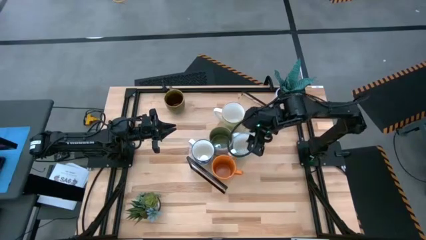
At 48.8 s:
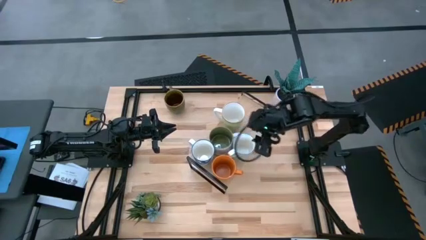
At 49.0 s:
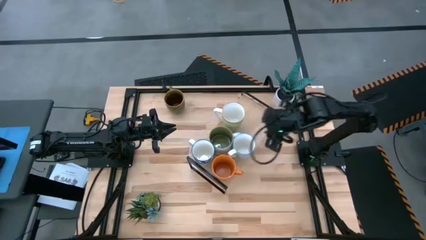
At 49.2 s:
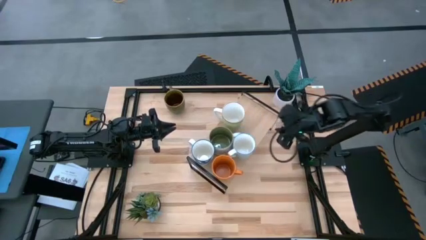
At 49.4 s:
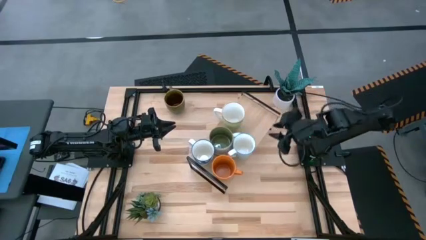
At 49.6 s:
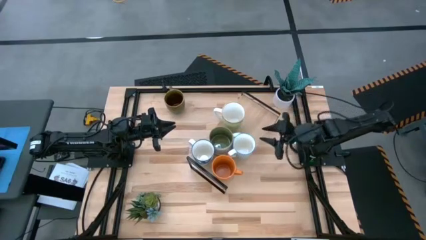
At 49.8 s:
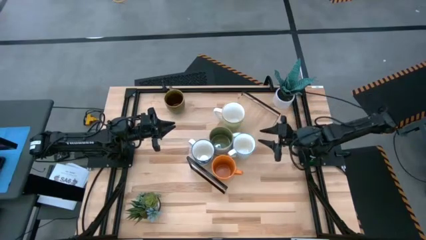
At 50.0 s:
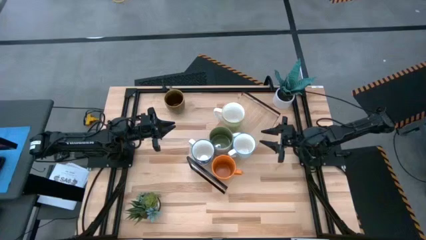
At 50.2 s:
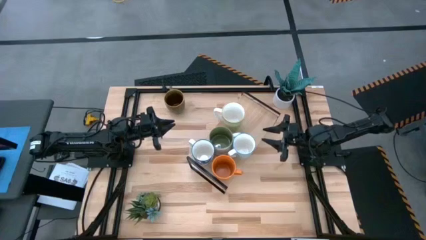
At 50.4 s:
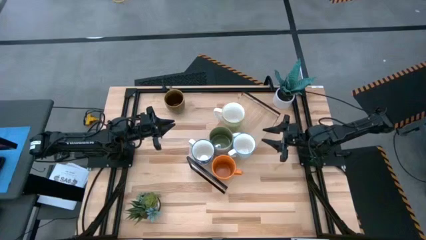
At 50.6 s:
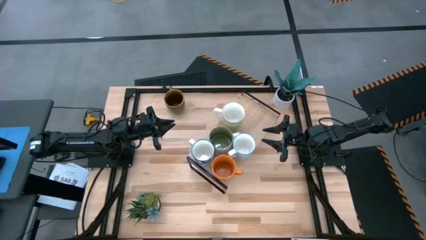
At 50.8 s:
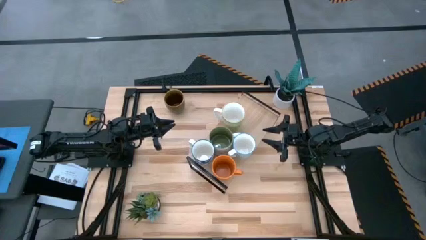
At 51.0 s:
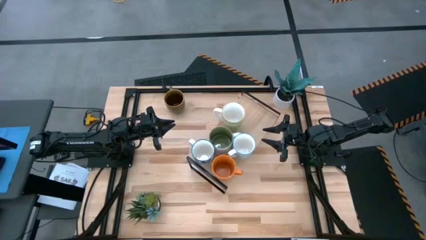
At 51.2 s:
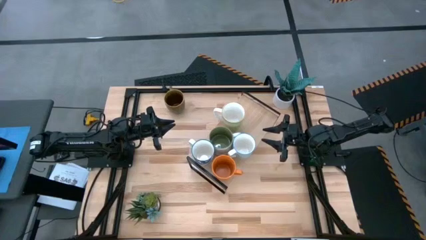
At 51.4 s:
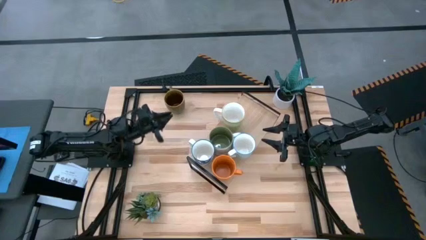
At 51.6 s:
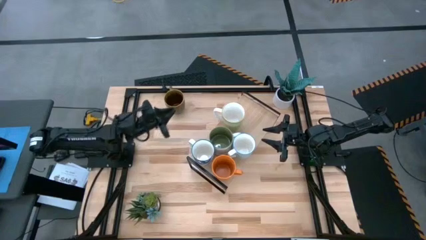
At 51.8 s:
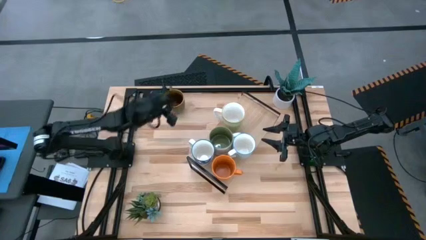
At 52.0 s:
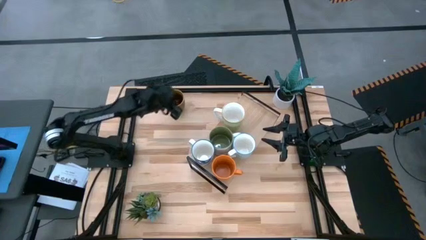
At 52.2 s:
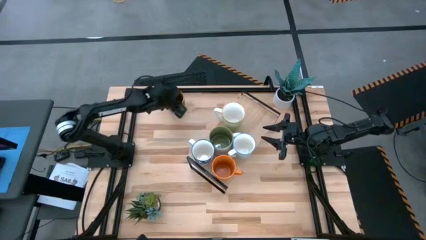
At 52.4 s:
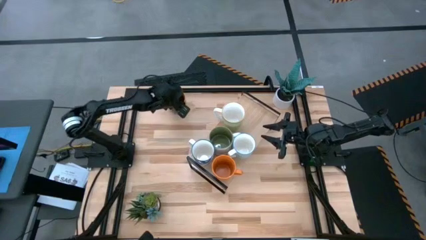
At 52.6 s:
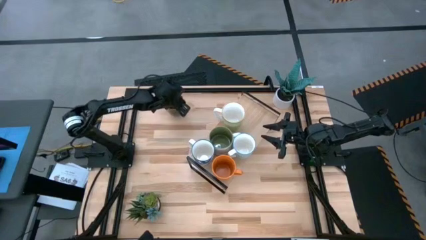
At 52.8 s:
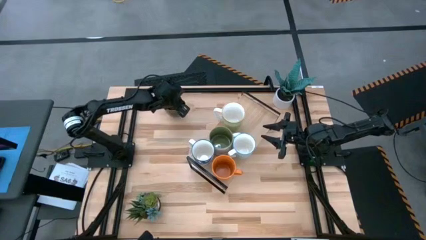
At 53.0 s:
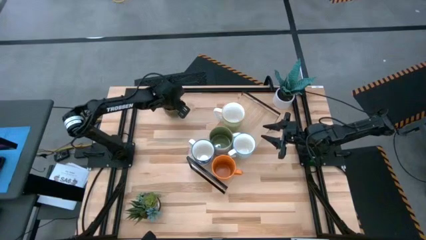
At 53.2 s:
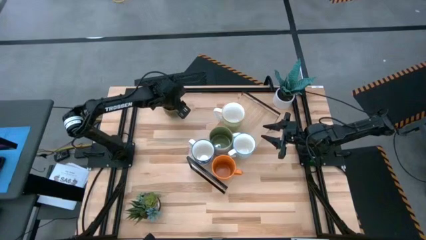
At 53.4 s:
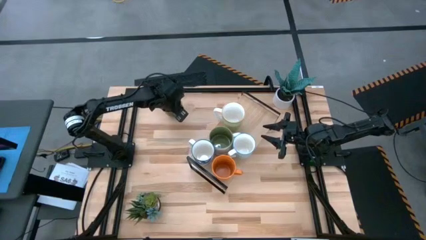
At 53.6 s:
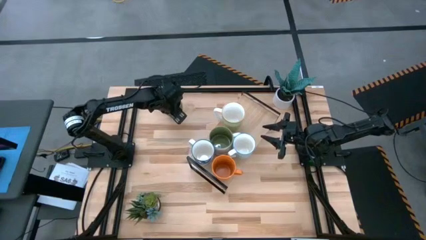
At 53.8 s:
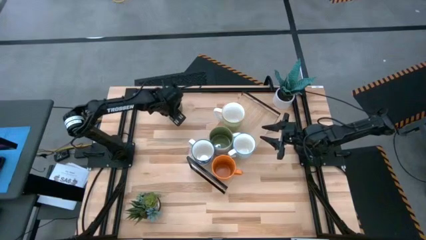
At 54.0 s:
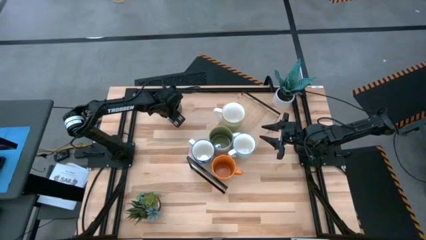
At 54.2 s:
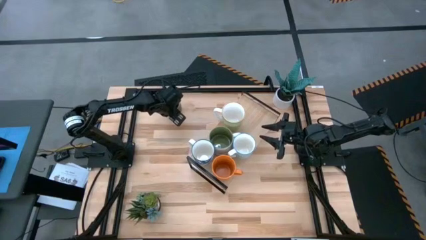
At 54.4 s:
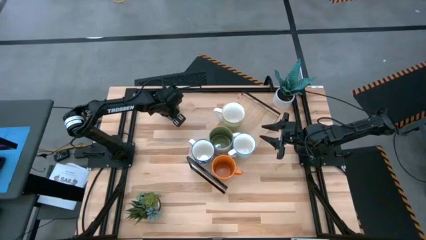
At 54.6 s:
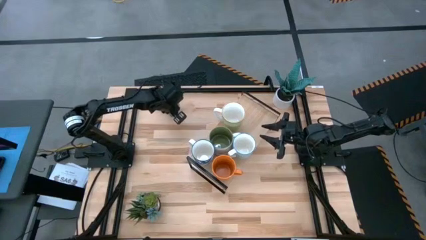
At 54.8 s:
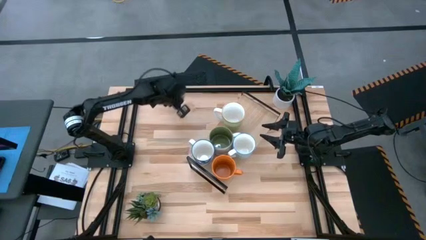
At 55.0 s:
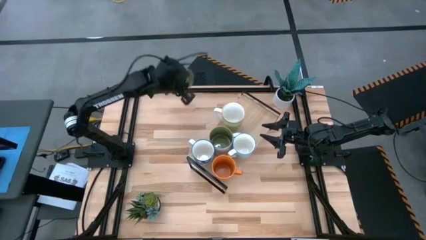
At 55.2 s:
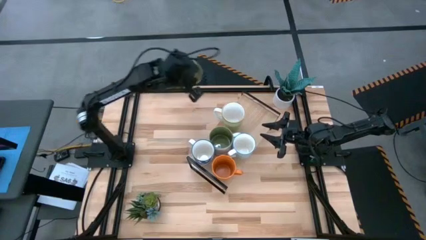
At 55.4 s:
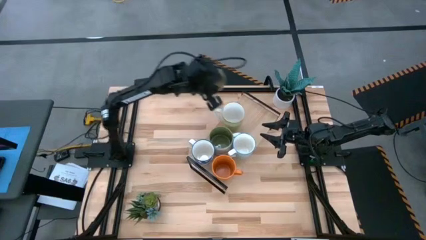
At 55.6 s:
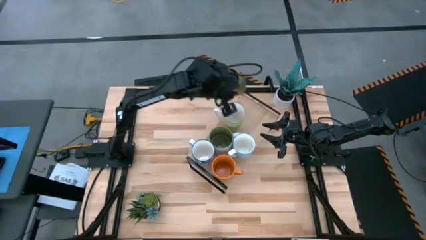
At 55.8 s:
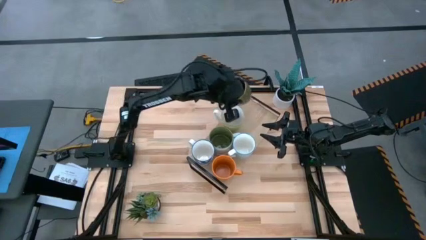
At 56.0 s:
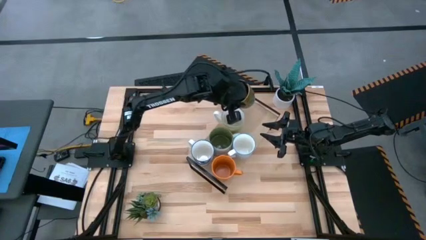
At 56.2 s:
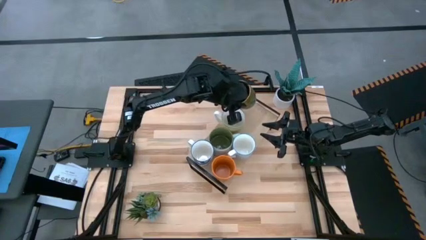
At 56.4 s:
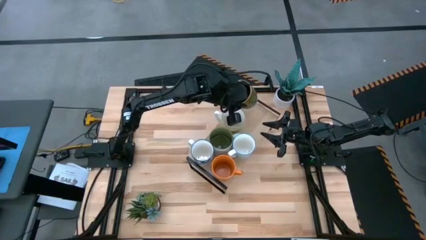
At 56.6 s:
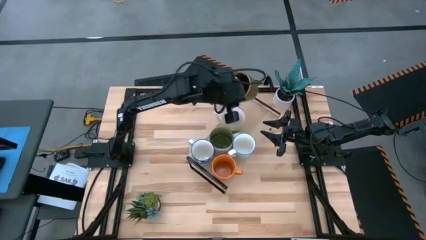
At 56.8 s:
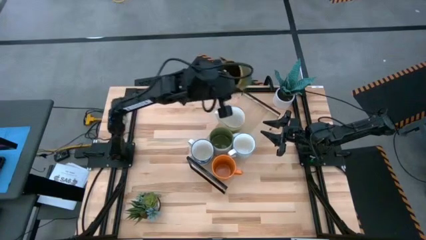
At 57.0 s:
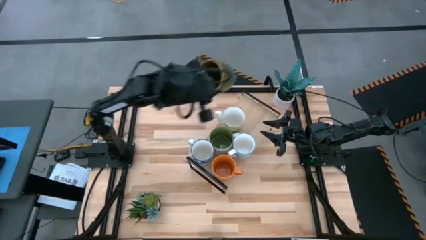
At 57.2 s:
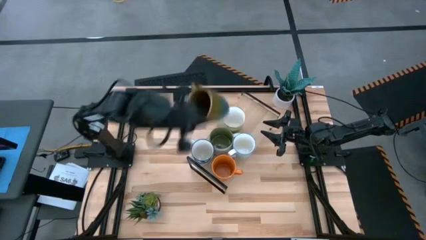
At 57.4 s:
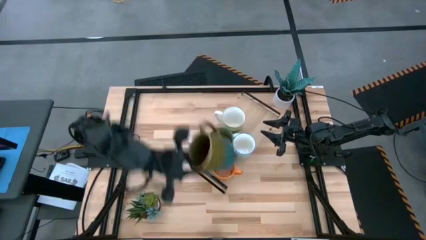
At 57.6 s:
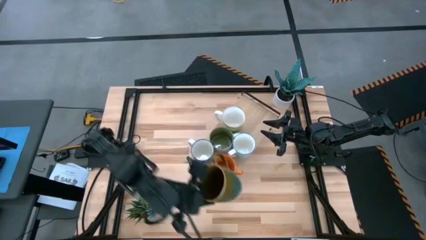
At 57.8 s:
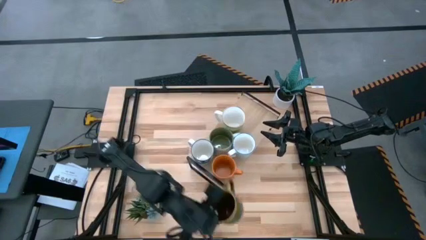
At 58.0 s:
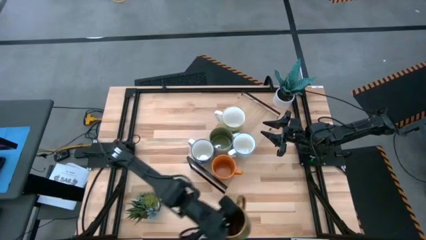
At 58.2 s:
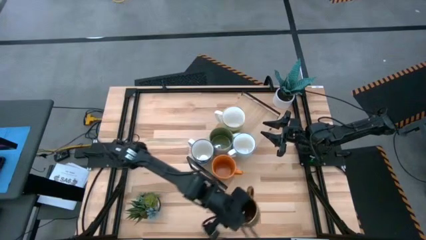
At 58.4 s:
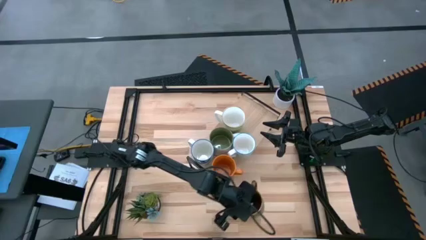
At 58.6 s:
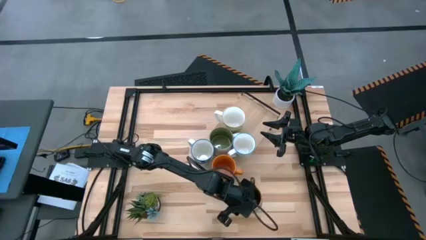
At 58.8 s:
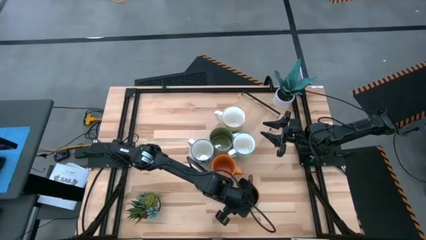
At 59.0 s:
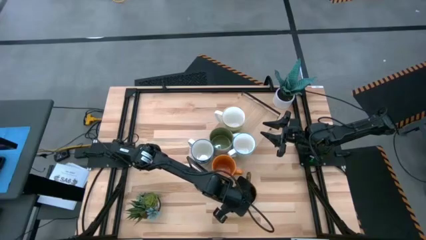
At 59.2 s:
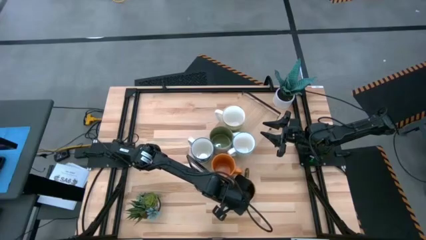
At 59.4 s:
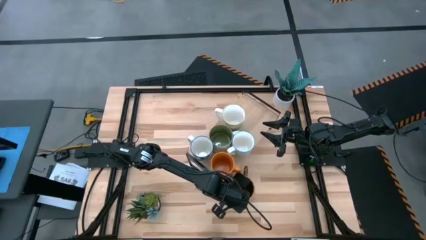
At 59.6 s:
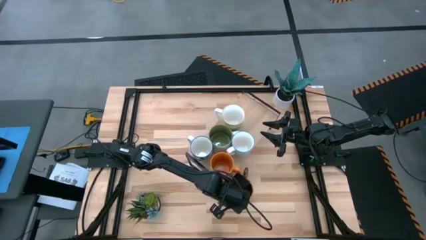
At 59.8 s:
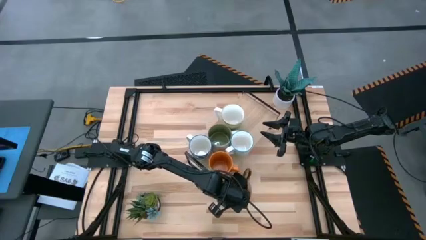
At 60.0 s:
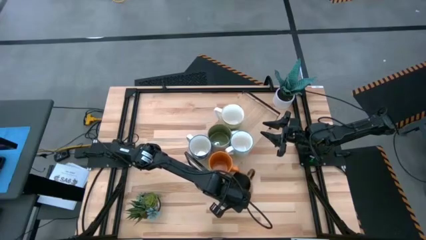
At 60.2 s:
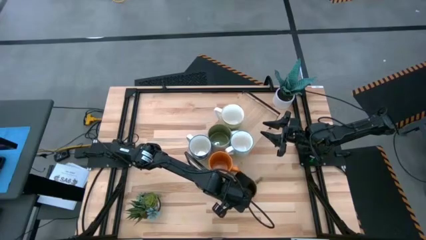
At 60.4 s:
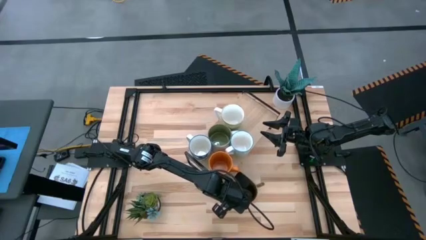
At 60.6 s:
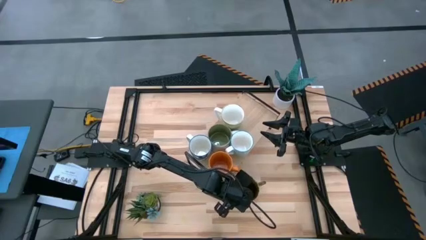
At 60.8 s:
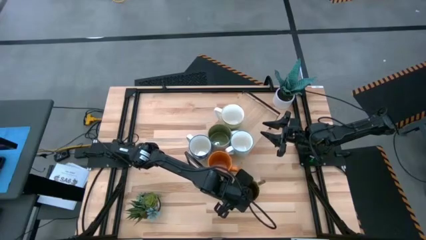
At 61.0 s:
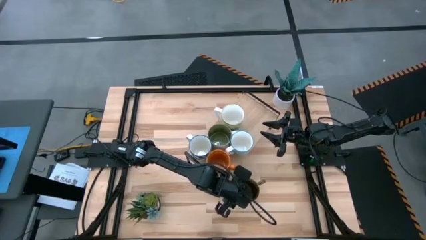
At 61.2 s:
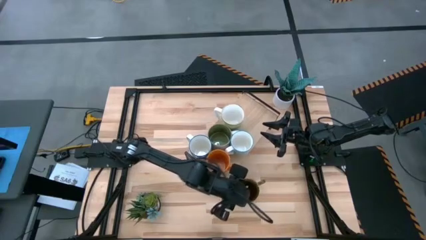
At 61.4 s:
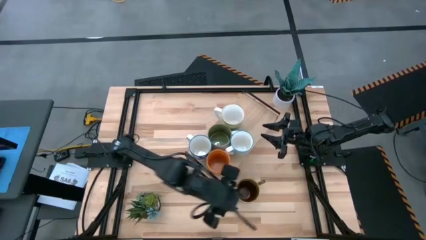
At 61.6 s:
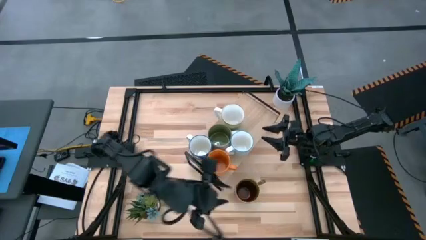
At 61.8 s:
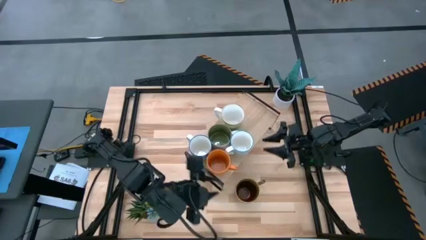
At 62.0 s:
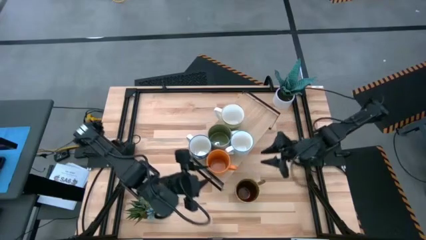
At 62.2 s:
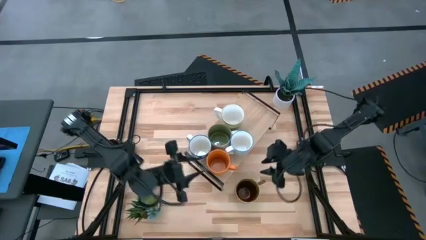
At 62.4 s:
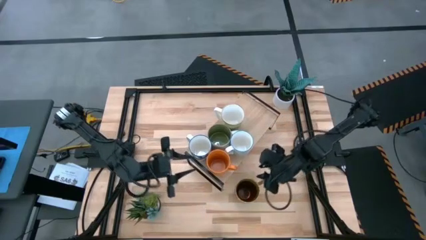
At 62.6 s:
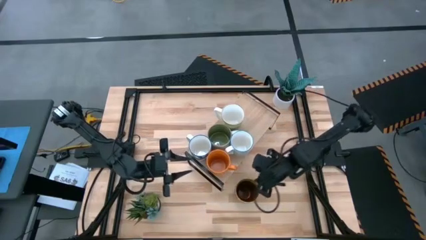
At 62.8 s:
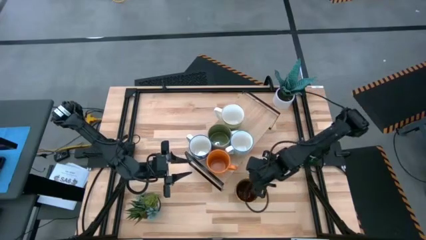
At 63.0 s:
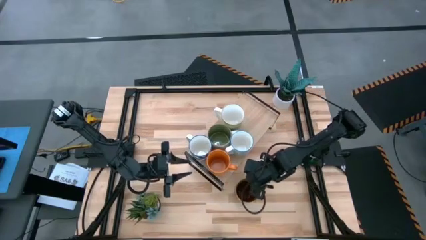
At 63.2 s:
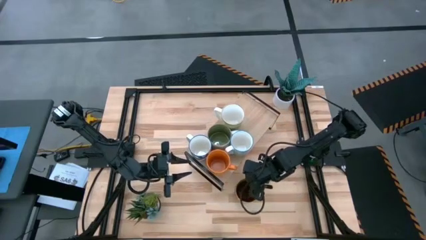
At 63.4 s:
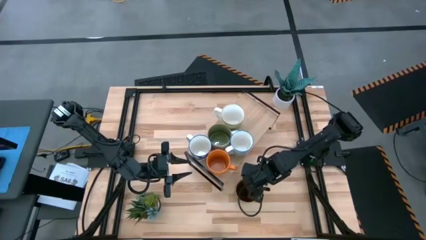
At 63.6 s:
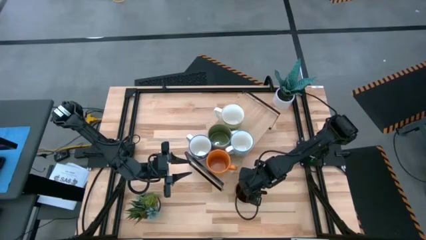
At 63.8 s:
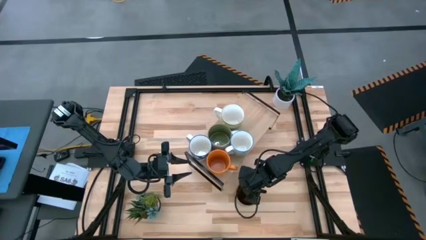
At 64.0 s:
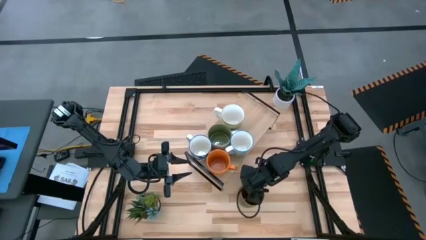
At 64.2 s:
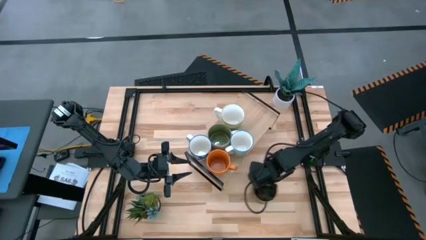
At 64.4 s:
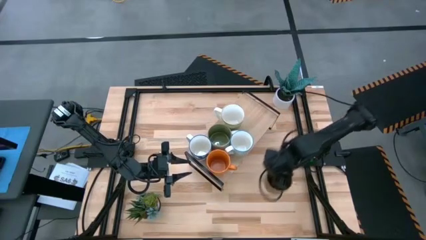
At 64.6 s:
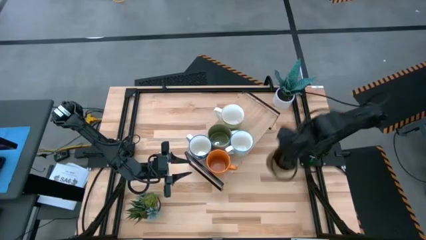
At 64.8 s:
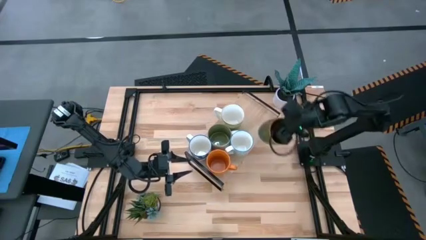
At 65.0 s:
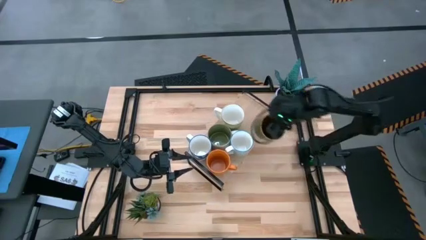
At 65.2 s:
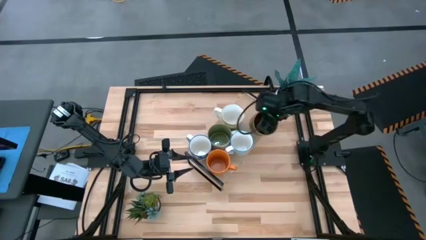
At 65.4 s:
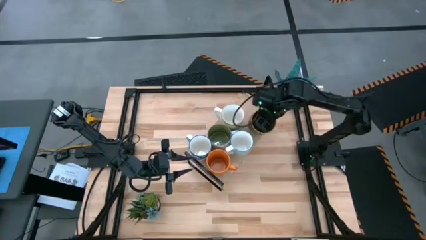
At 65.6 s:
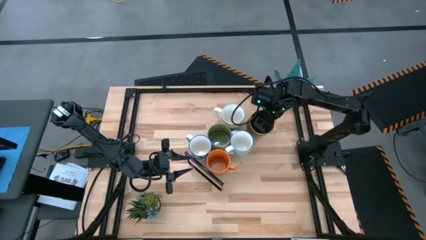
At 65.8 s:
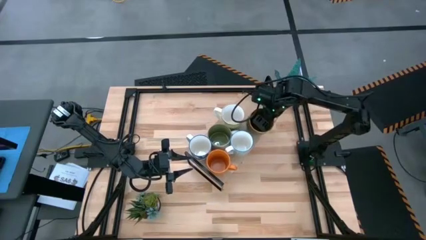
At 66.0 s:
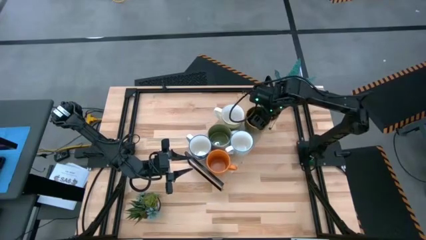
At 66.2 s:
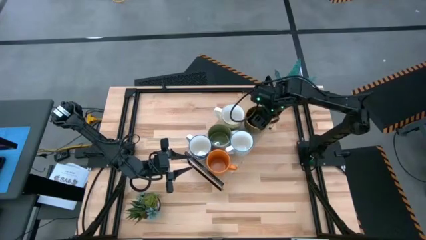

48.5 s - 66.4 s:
Task: Place coffee mugs
Put the green patterned mug on the shelf
